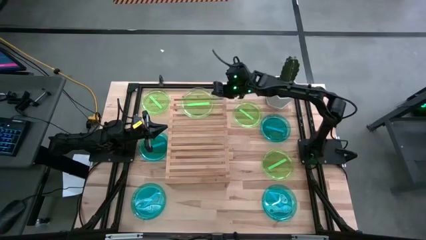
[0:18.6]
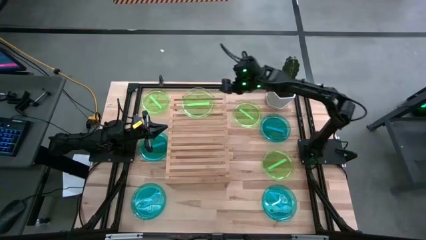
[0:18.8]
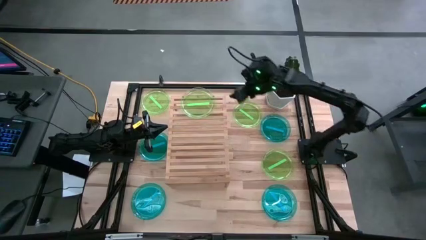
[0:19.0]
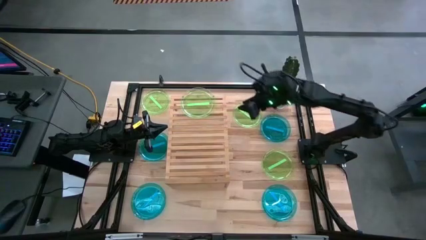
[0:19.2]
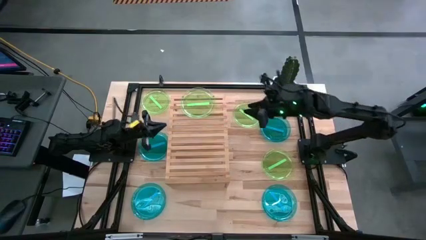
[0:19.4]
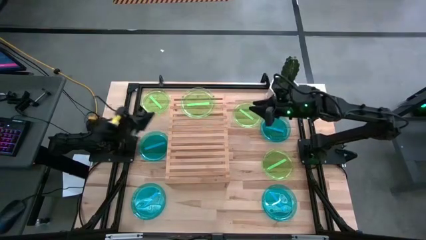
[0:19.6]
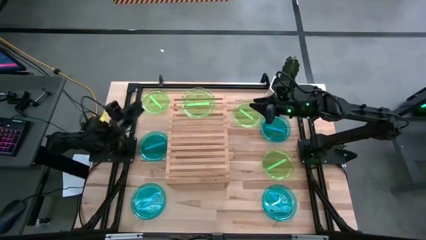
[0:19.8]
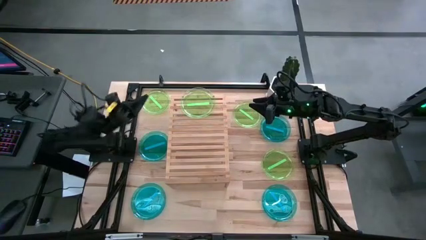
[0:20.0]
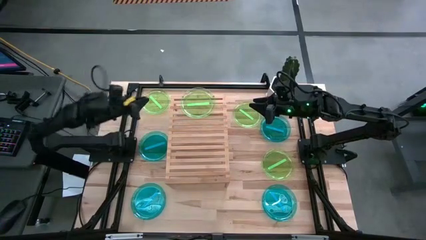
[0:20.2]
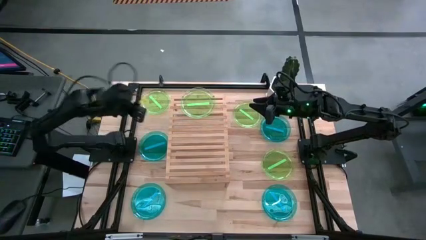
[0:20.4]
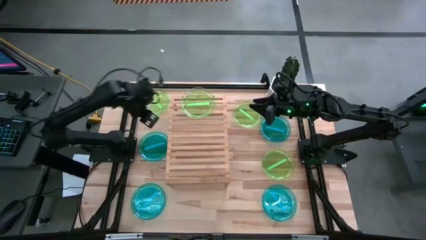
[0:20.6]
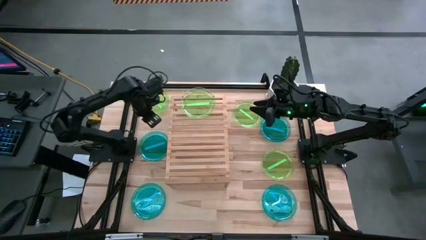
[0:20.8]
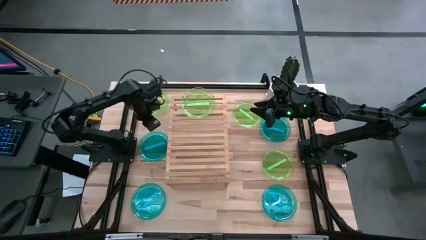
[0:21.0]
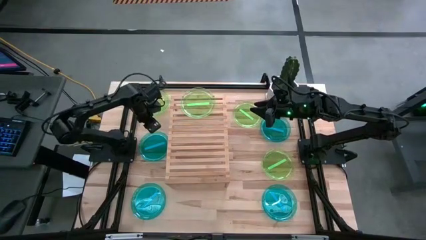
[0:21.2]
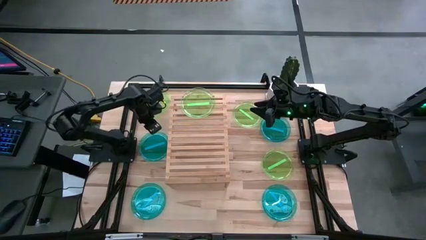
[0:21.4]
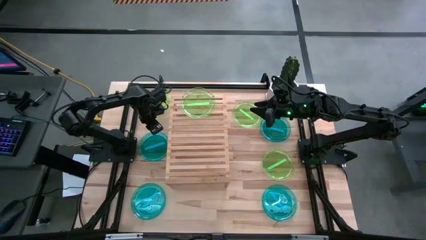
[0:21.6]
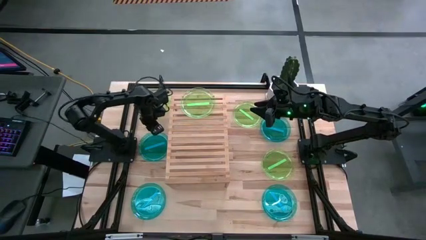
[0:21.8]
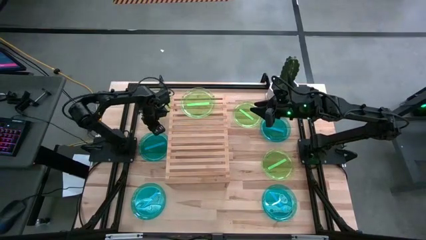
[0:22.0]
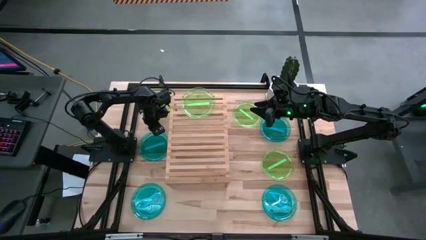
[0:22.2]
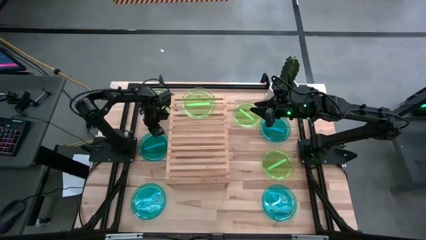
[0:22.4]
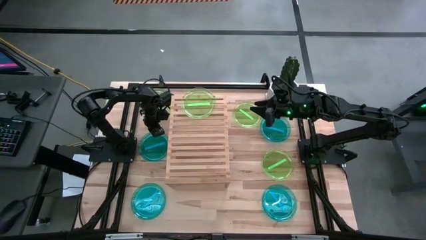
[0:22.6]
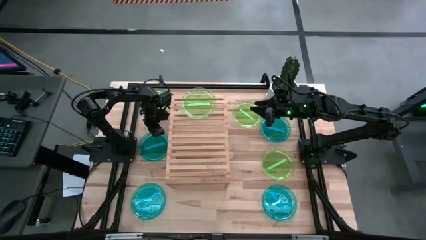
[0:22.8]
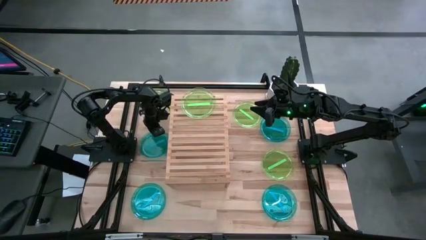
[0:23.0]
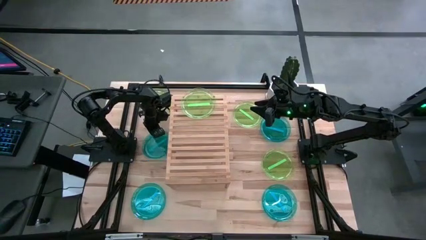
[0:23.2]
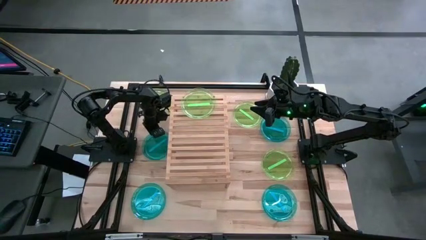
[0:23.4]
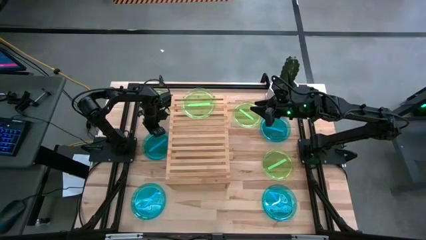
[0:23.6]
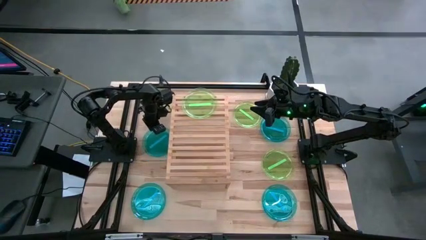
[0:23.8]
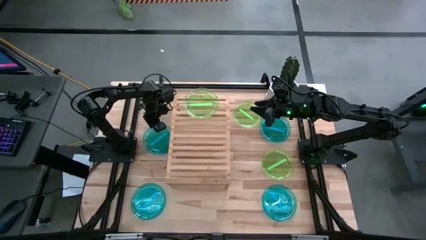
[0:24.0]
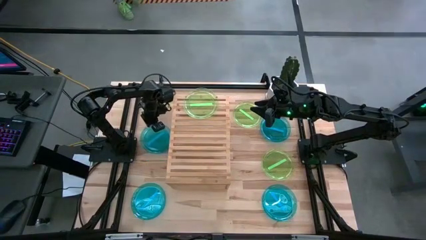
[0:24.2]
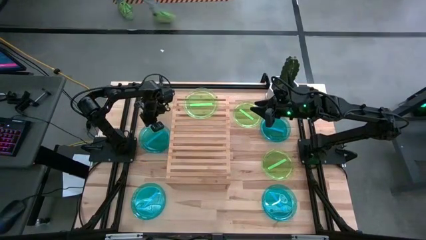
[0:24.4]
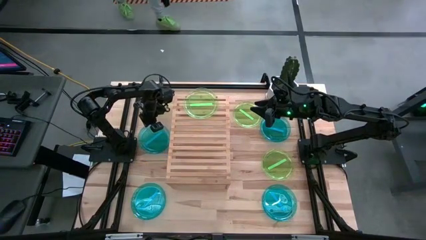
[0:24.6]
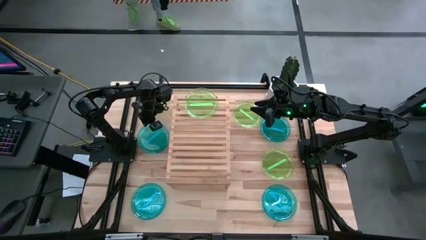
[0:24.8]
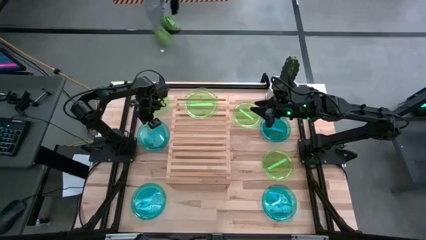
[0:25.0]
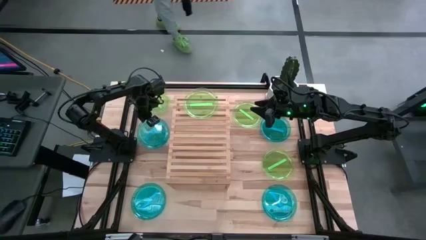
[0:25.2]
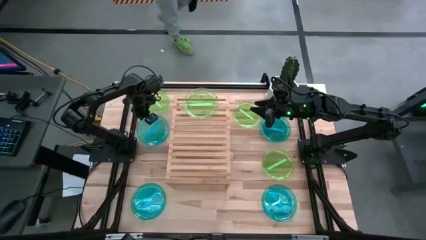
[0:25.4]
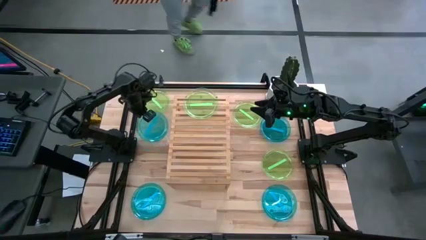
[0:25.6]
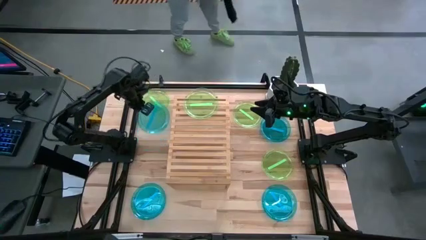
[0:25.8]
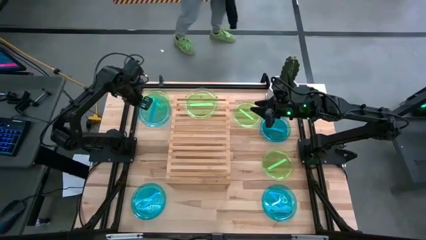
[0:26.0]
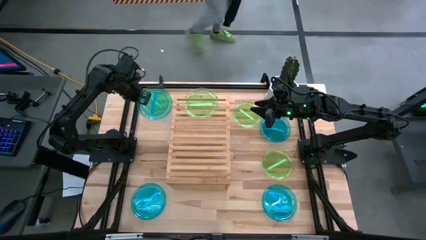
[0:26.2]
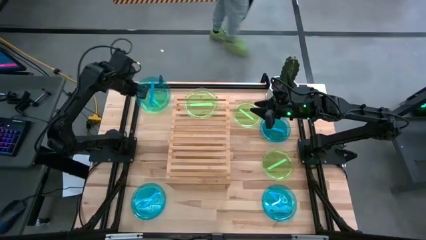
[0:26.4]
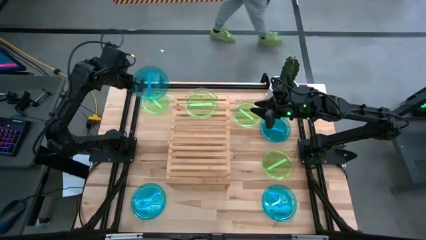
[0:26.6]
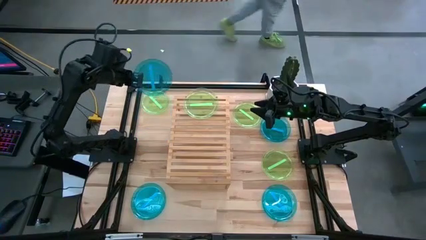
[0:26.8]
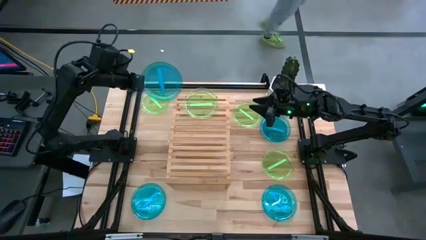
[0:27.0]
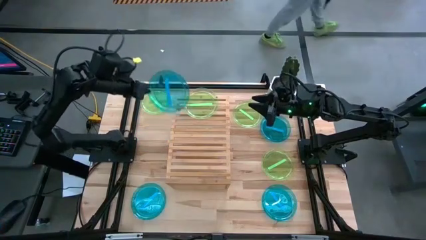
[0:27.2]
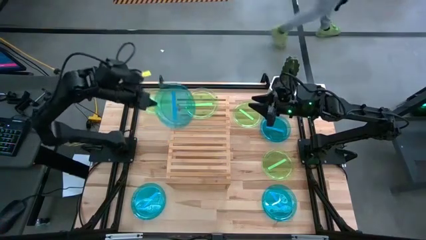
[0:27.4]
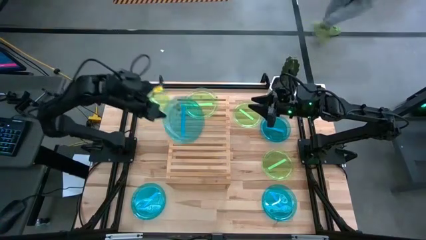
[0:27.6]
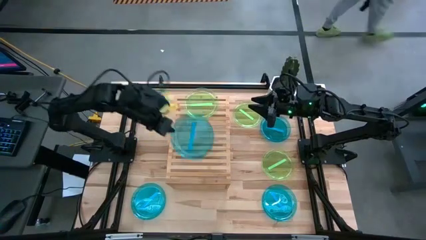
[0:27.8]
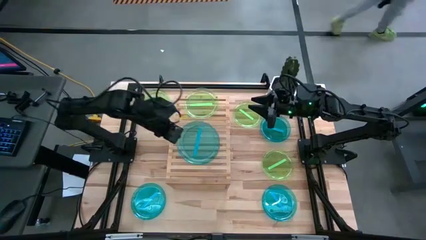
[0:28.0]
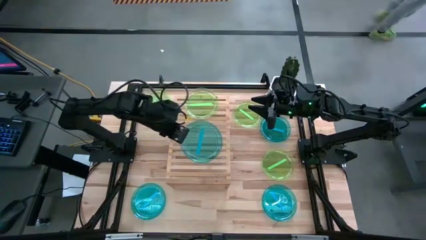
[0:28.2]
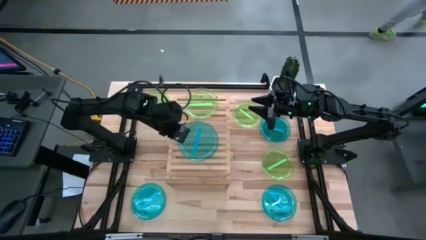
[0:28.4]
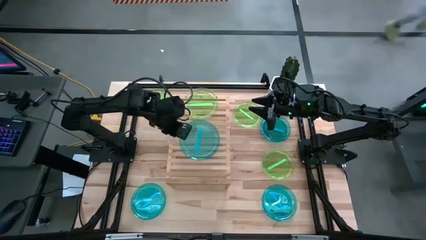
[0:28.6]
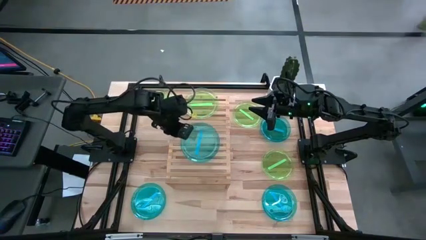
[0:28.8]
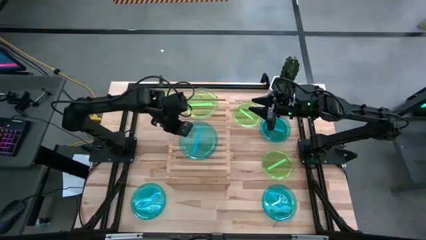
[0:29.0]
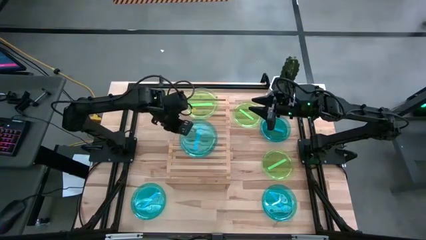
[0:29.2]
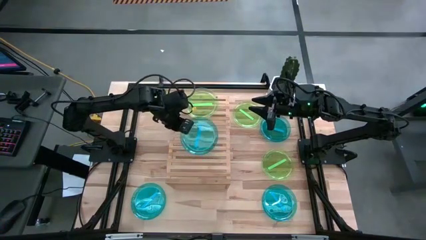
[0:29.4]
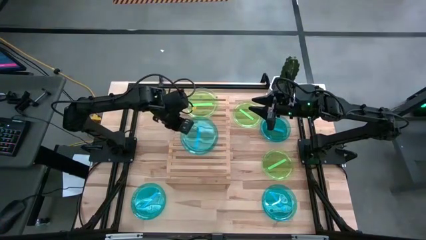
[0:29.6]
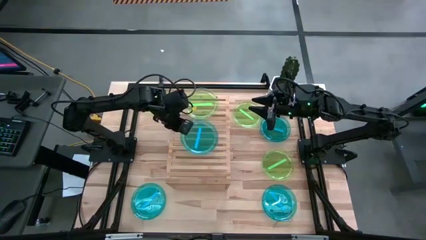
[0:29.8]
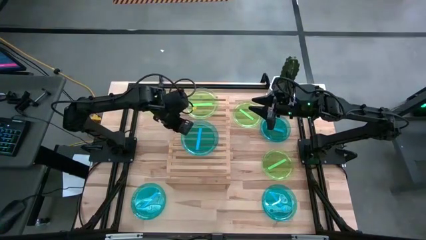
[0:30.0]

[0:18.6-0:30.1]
Task: Place and stack plates onto a shelf
Put the top left blue plate on the shelf

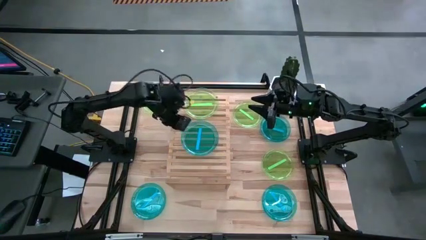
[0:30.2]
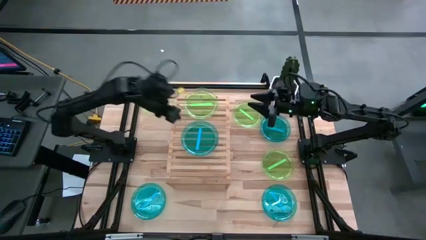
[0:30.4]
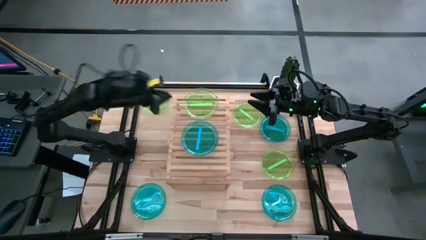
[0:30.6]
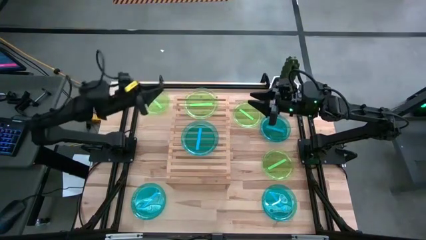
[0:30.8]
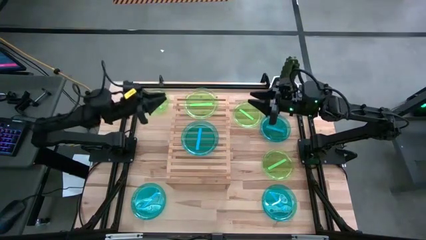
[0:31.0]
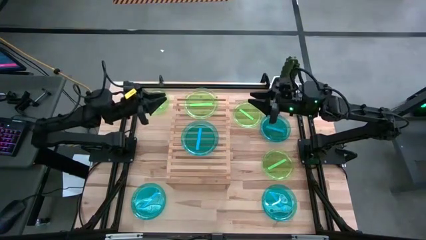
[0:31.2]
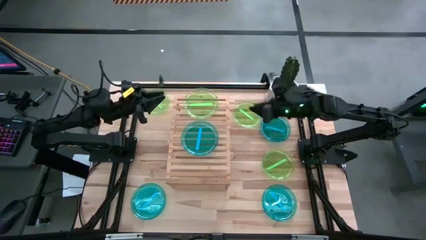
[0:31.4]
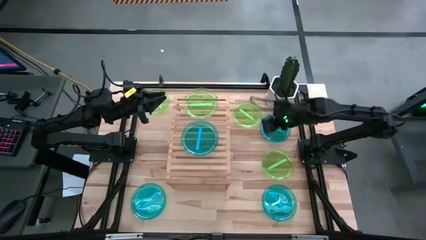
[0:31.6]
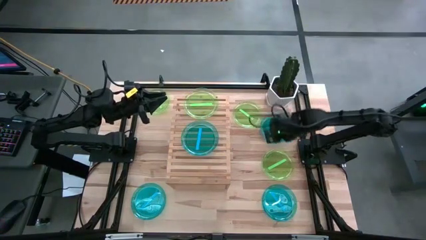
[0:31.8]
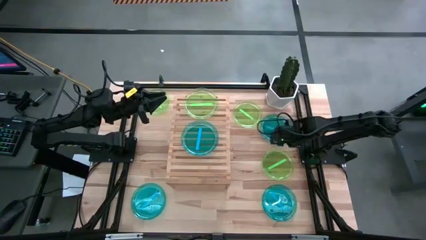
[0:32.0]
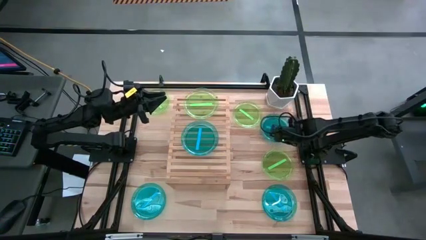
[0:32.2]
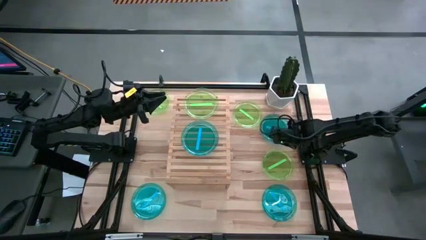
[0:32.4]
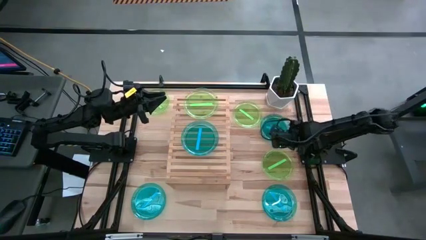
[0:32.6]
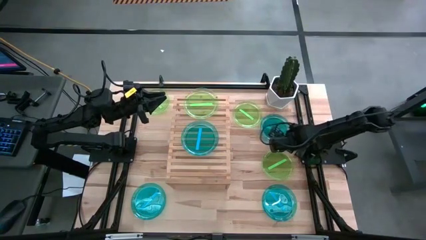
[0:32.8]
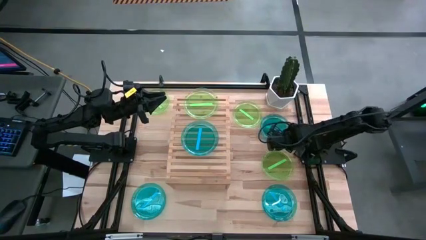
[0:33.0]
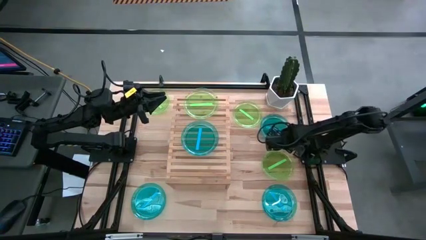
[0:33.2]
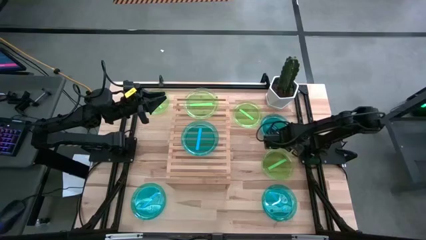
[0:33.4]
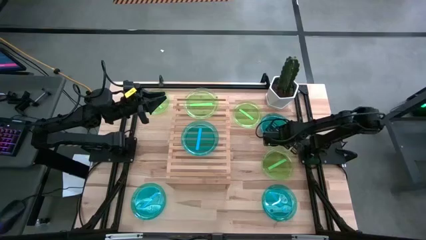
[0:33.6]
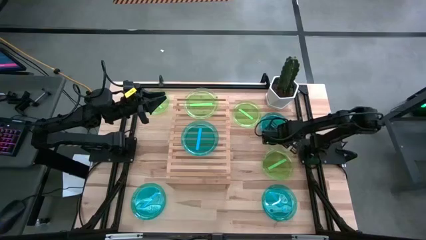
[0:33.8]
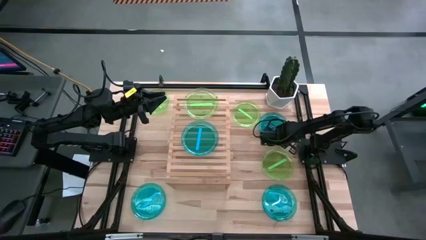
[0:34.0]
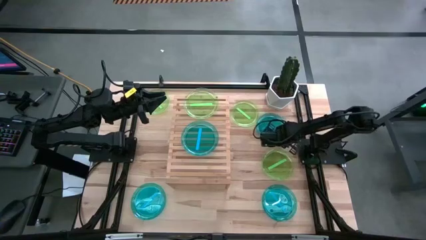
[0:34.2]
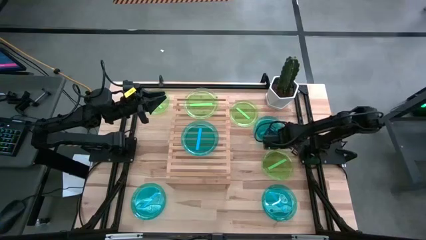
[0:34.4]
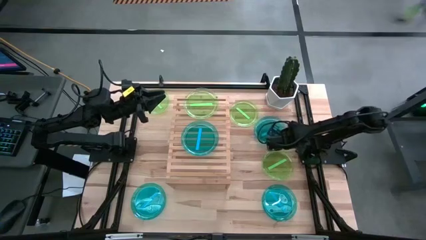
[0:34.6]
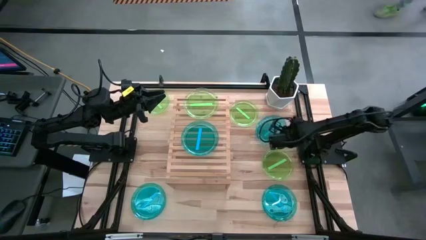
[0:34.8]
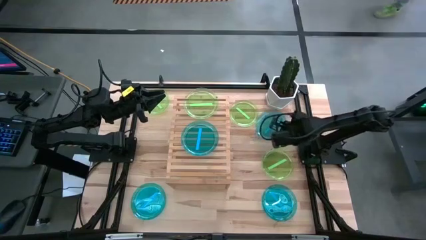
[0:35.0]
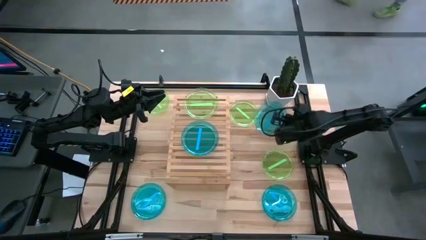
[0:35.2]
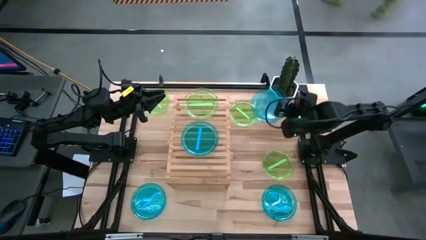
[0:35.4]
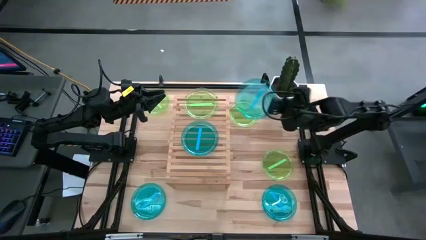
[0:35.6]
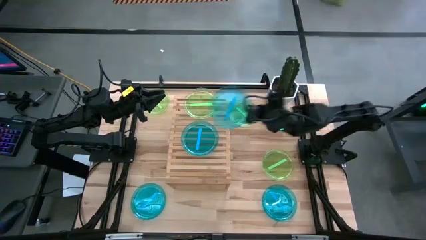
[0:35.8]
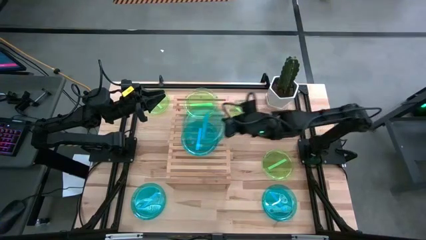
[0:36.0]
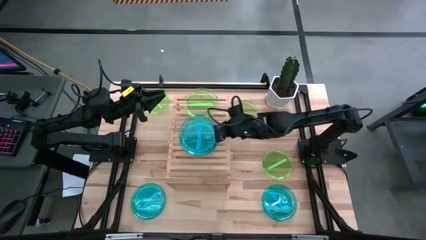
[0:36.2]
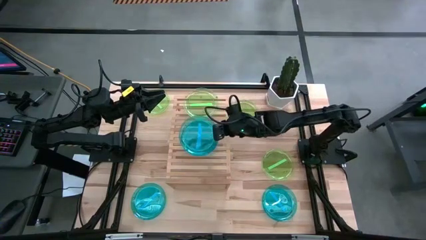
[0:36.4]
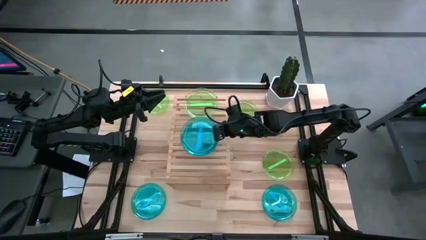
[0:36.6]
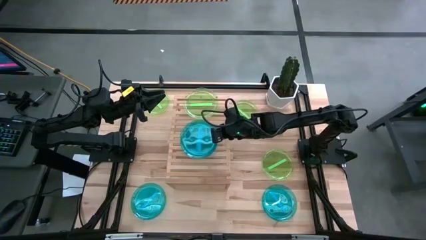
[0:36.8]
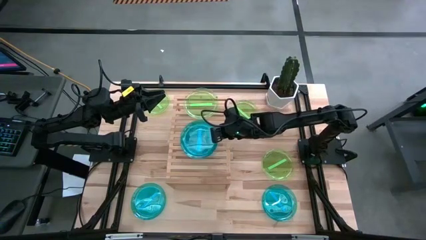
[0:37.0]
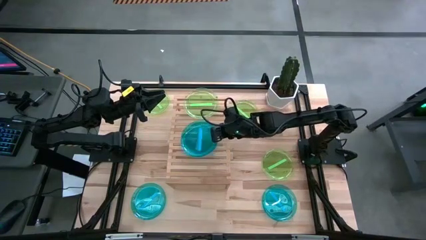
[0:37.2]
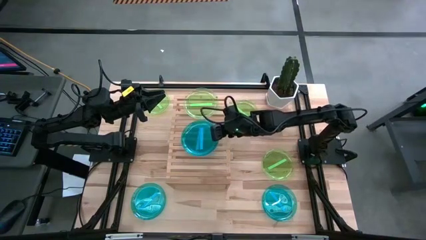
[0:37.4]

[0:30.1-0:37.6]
Stack the top blue plate on top of the blue plate on the shelf
